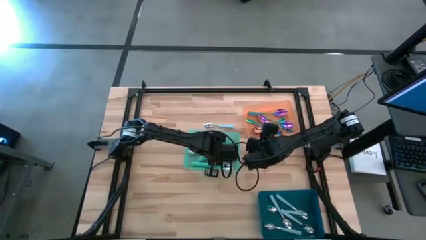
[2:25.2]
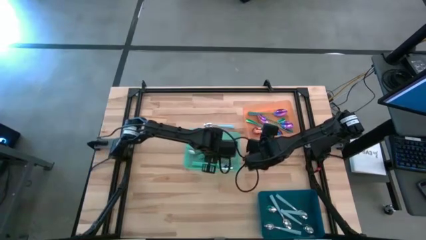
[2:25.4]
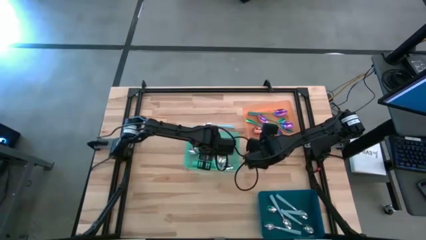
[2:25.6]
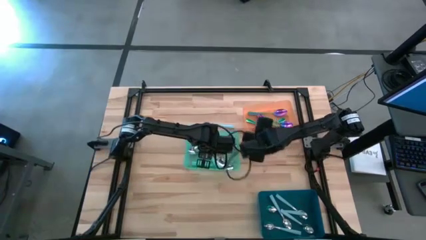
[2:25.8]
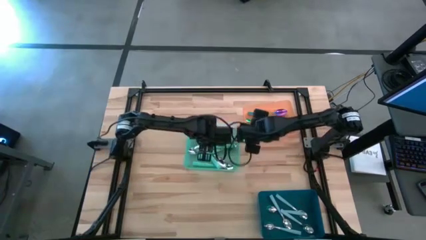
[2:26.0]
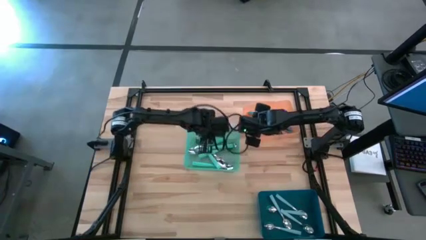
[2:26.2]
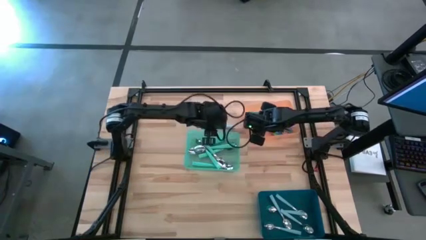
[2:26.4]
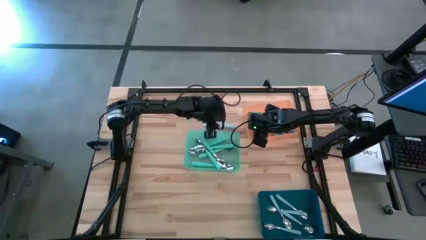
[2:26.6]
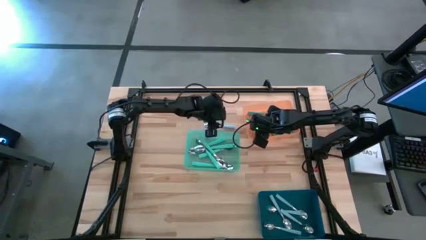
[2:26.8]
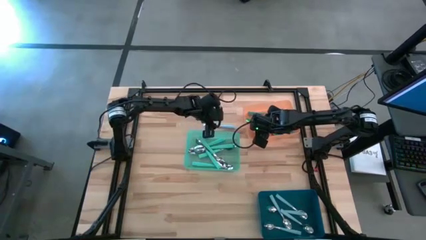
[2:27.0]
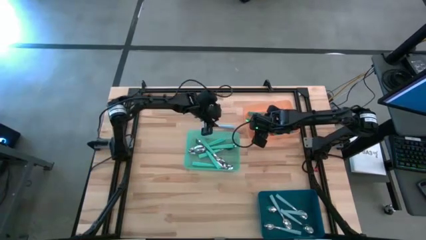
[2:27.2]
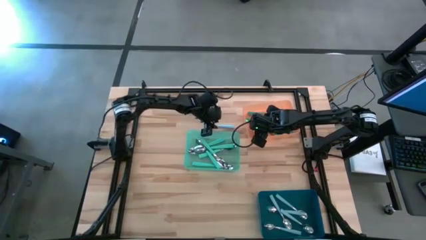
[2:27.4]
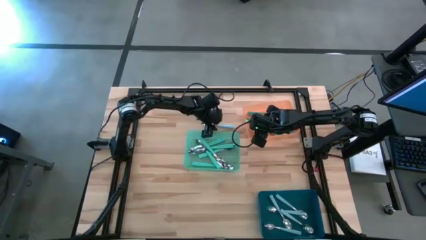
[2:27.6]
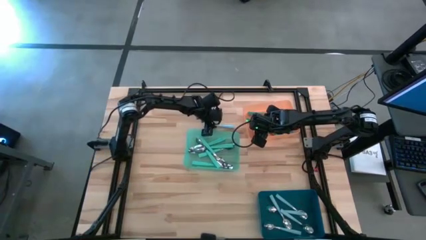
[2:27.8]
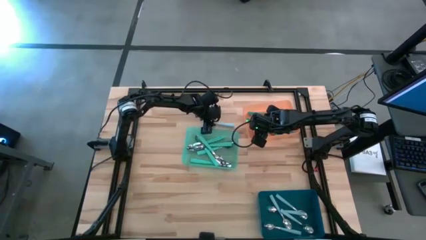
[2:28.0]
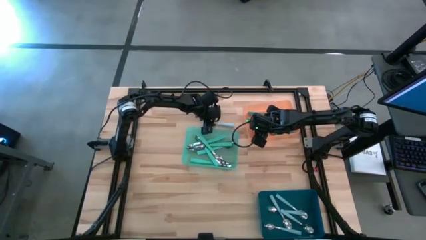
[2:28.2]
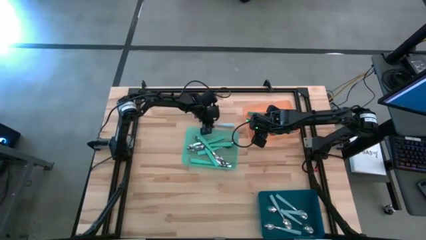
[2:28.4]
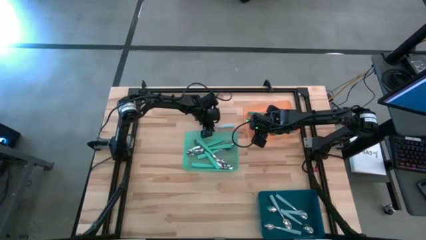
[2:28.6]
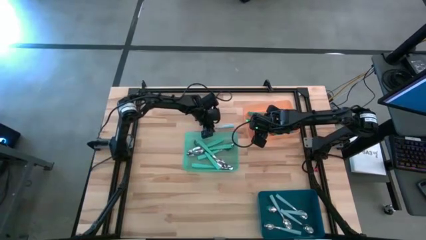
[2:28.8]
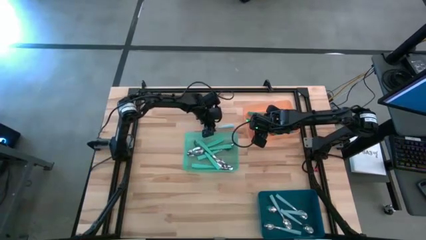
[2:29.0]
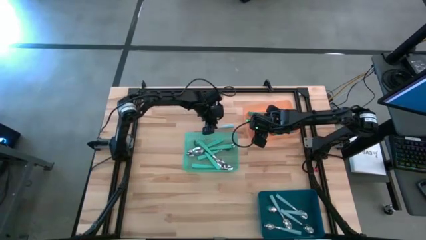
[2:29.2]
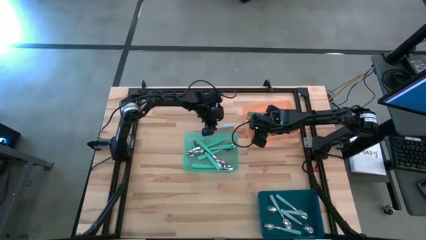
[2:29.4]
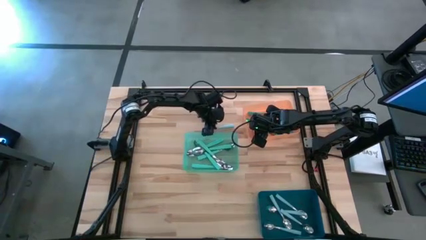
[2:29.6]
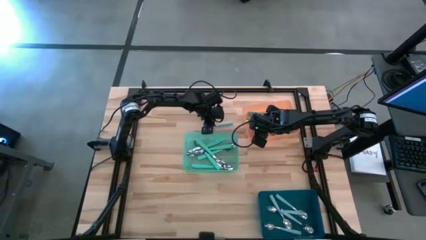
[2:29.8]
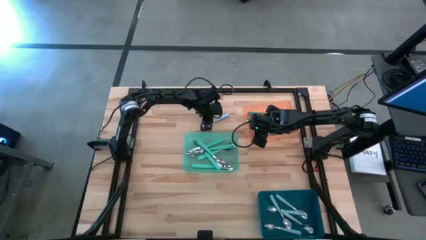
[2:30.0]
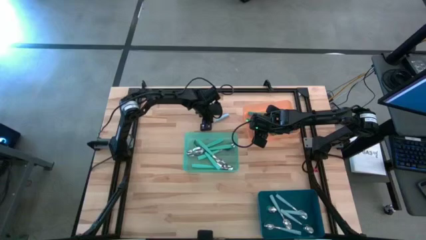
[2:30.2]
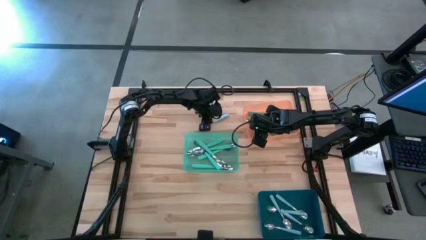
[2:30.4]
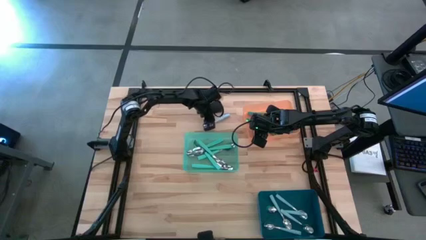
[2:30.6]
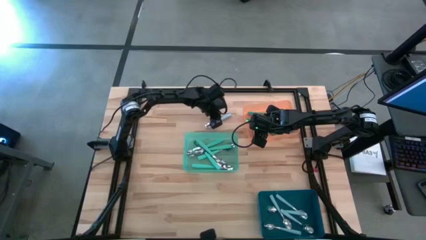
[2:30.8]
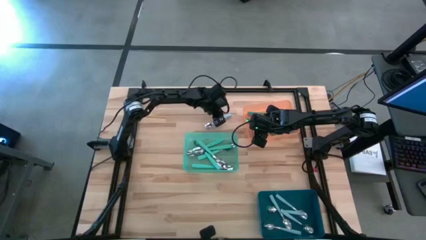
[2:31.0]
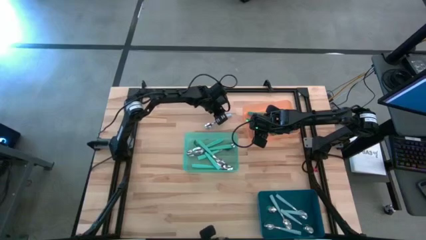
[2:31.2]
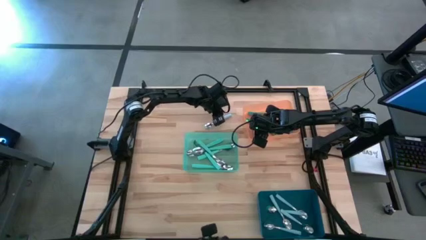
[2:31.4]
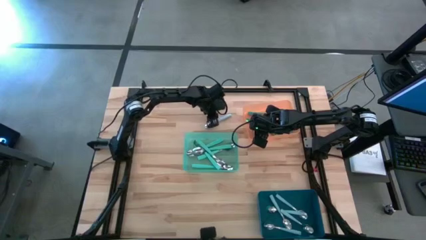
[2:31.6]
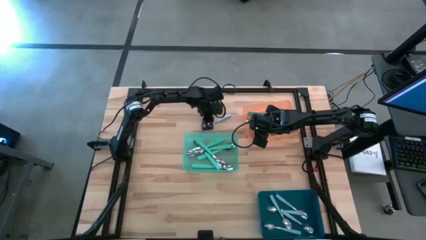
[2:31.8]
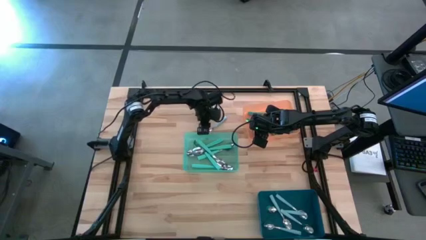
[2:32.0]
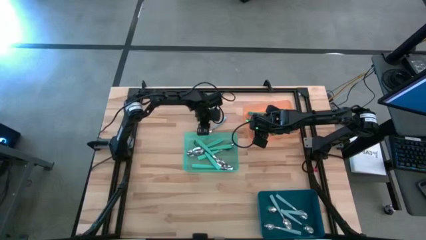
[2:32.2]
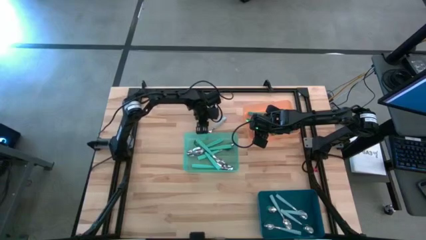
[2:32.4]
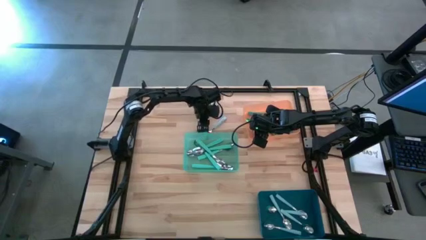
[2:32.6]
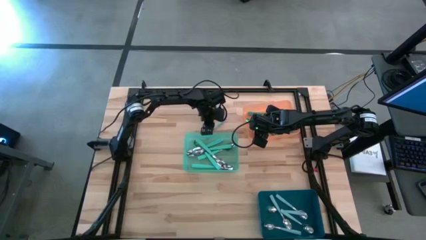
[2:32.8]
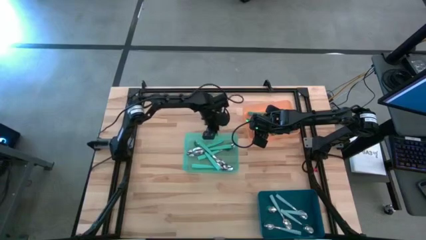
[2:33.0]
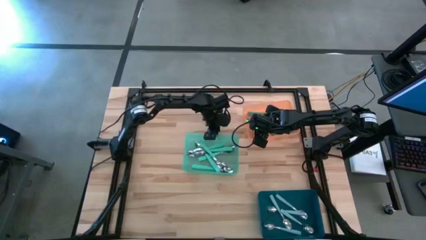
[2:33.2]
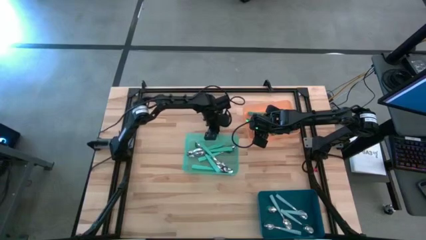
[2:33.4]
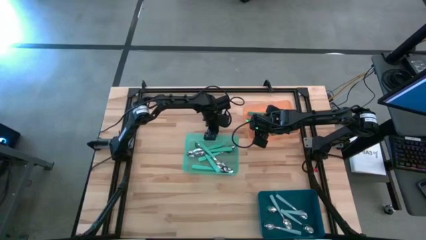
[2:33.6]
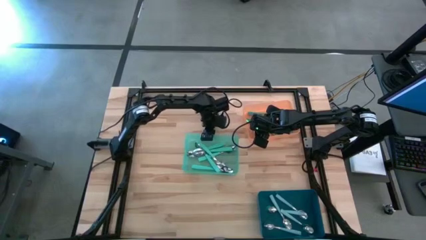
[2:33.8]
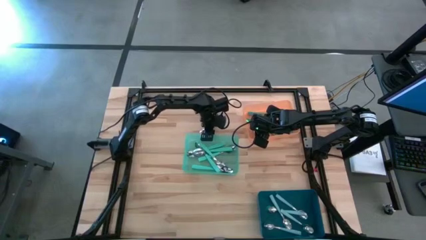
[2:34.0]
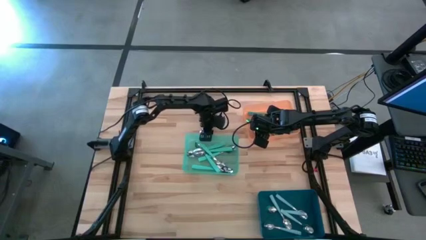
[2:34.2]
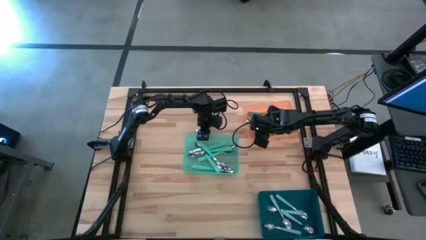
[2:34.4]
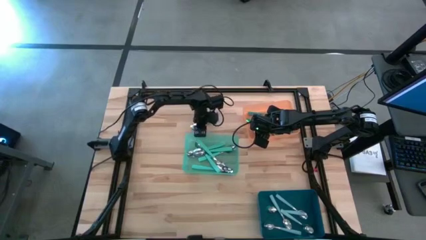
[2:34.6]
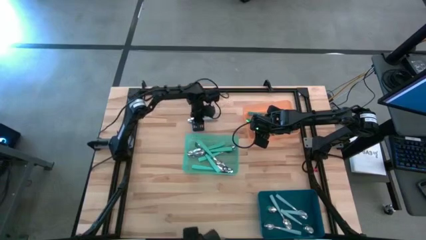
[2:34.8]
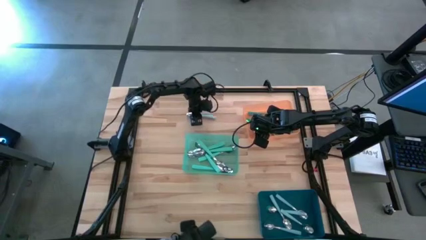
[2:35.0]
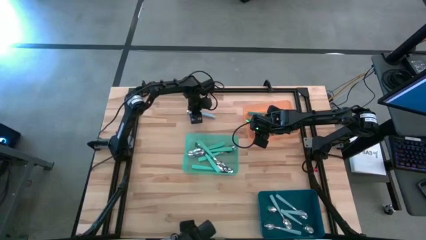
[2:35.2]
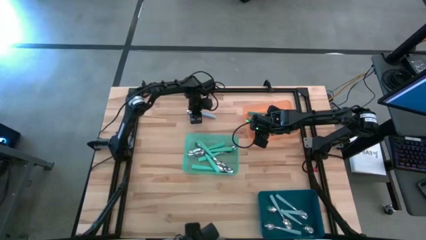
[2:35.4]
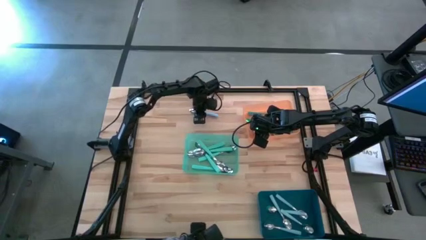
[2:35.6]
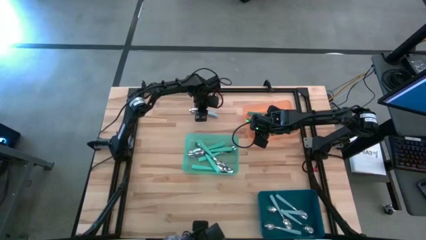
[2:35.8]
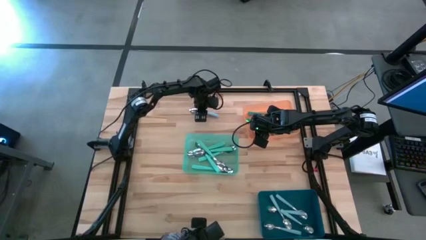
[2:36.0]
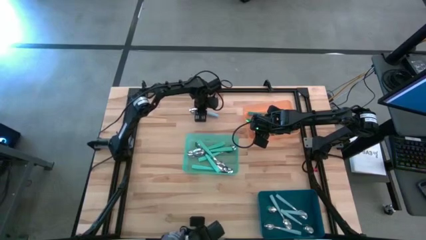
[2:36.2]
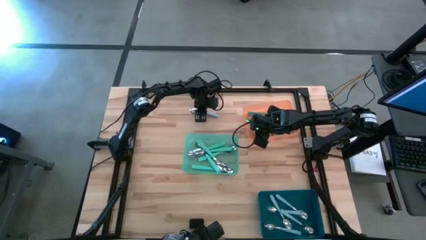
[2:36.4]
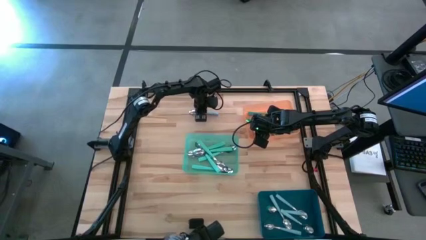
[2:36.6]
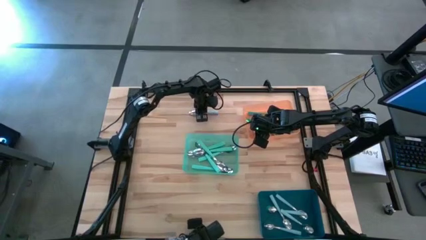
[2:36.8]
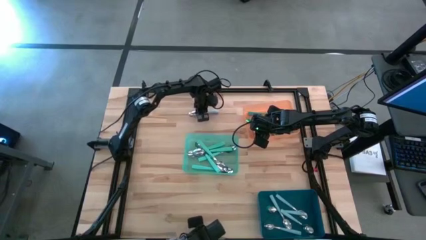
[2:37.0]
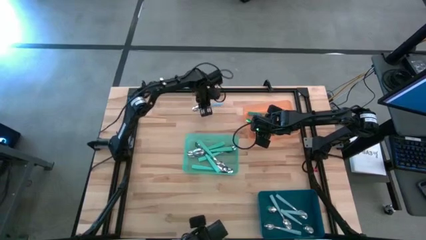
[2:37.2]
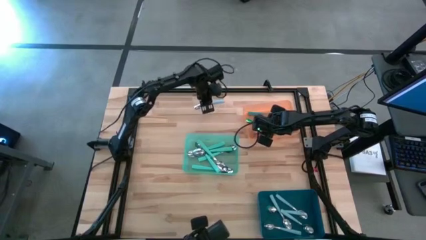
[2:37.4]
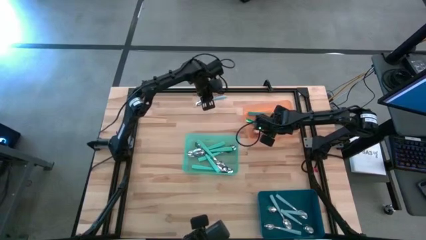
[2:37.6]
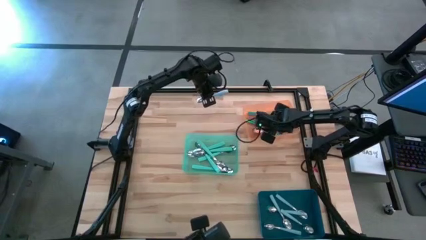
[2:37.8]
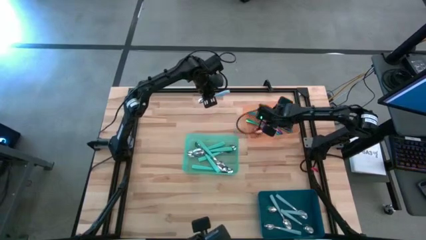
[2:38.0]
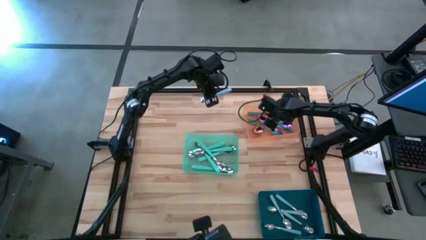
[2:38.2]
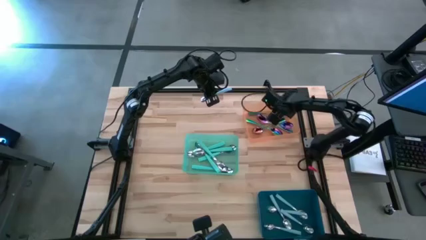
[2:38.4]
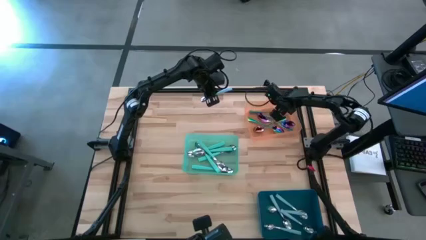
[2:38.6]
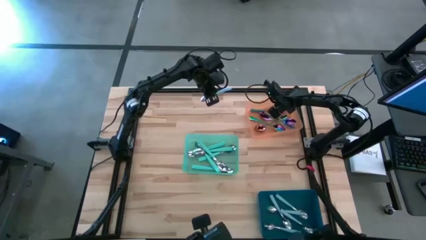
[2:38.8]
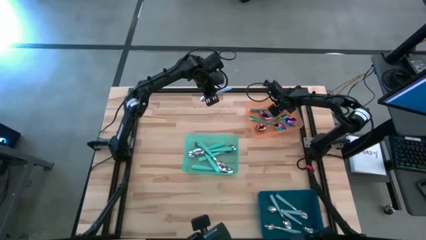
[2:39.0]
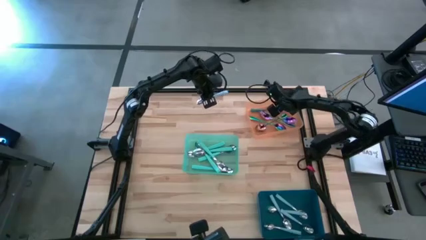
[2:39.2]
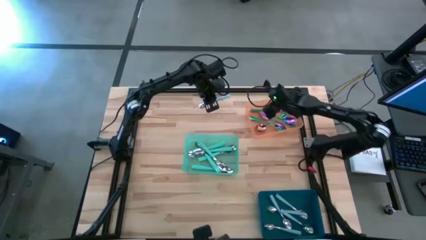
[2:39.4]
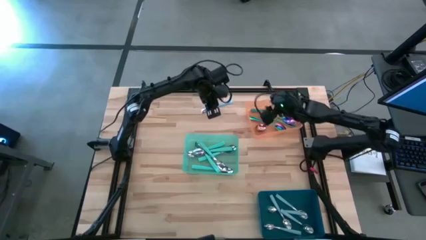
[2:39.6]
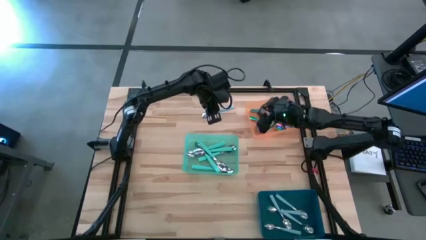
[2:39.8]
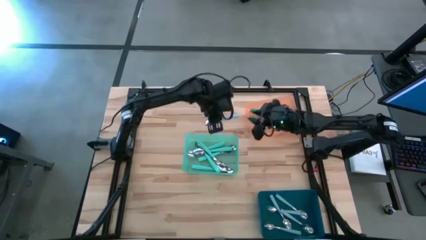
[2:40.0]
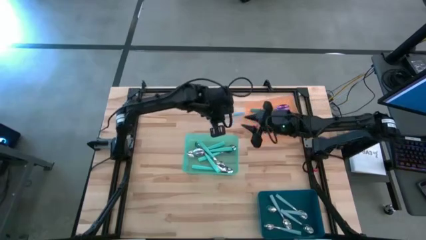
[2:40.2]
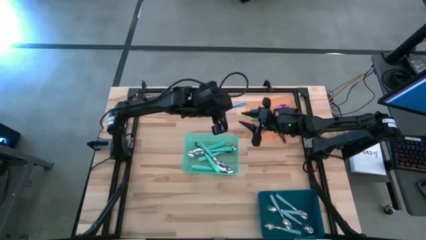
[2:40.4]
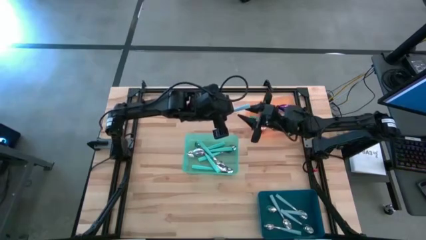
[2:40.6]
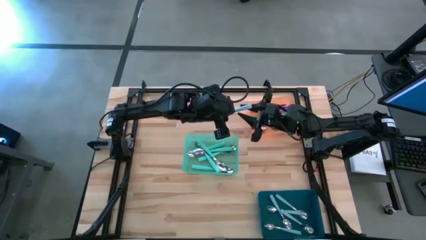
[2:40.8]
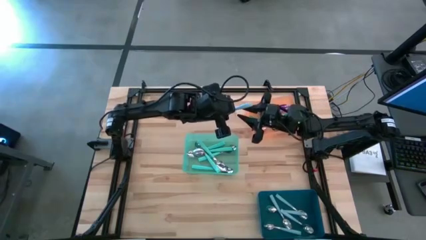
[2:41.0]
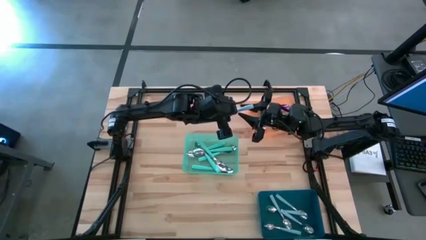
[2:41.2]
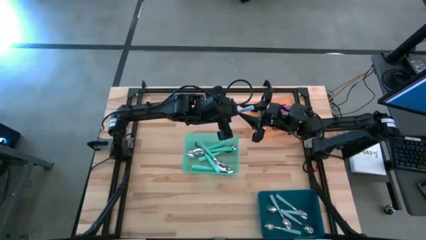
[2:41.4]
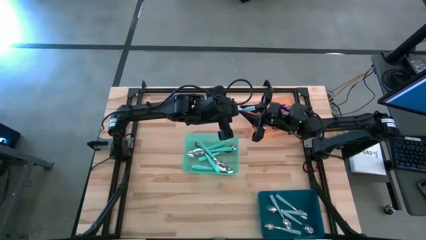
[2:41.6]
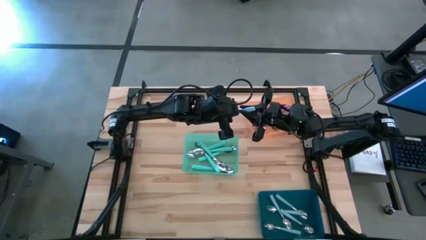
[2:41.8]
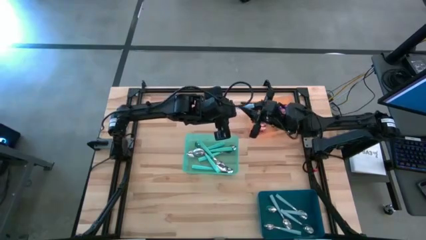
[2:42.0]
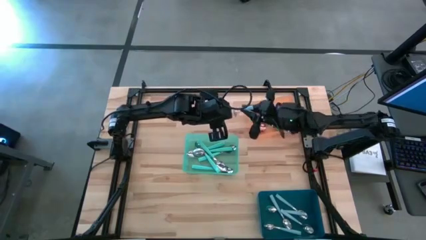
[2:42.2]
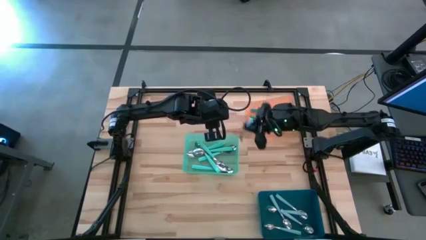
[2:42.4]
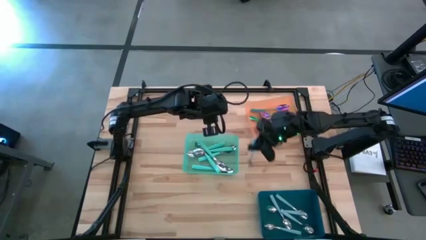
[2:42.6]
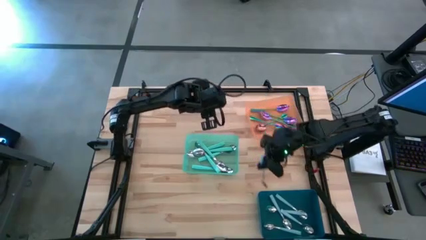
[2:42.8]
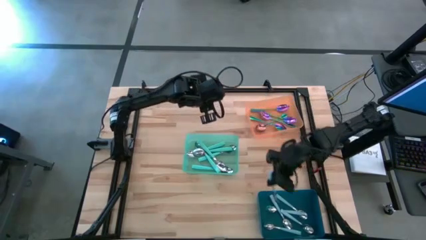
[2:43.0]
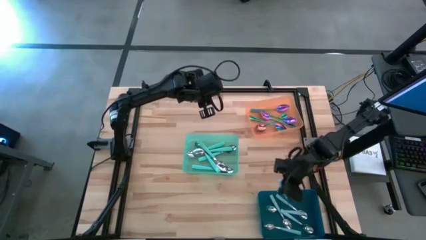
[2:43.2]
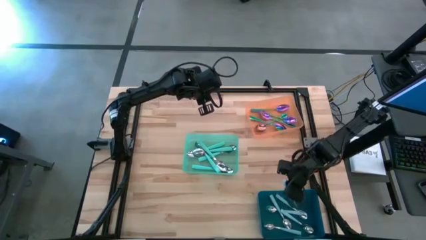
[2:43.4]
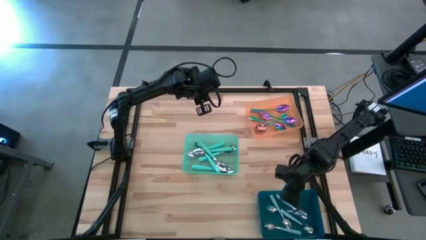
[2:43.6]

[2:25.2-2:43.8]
Task: Sort silverware by color (type)
Put the blue spoon into the blue bin
